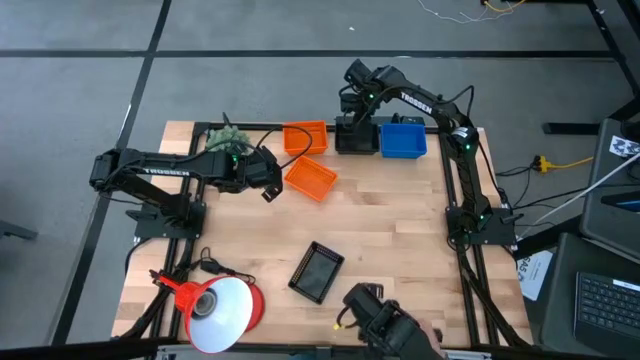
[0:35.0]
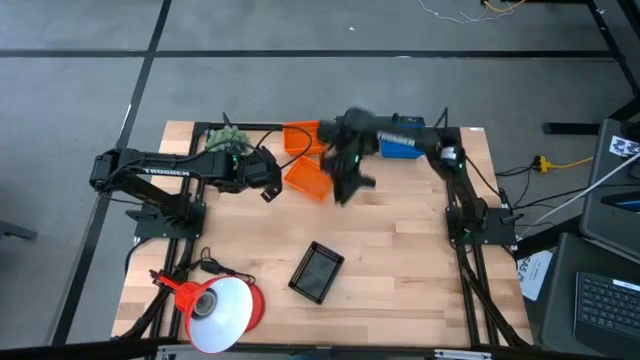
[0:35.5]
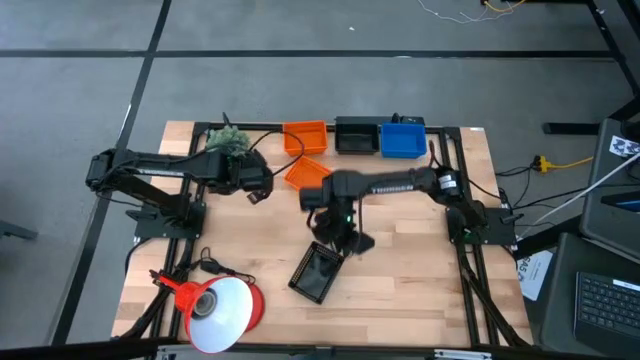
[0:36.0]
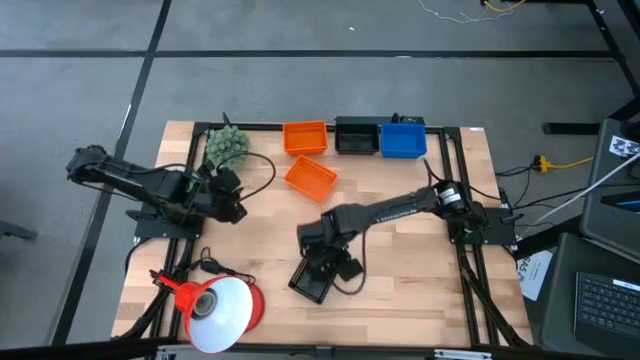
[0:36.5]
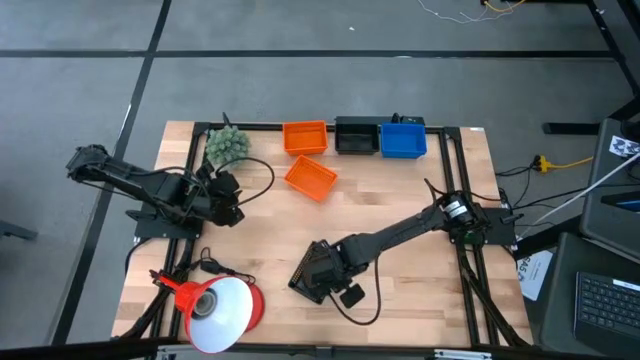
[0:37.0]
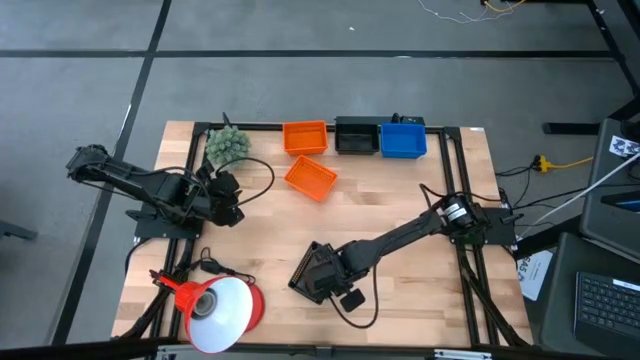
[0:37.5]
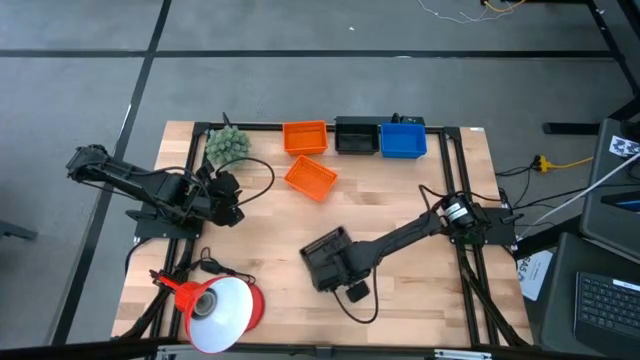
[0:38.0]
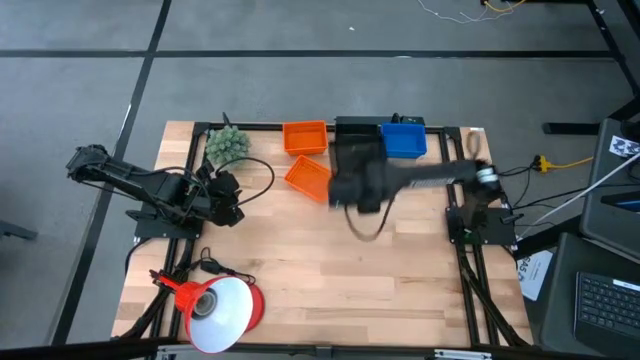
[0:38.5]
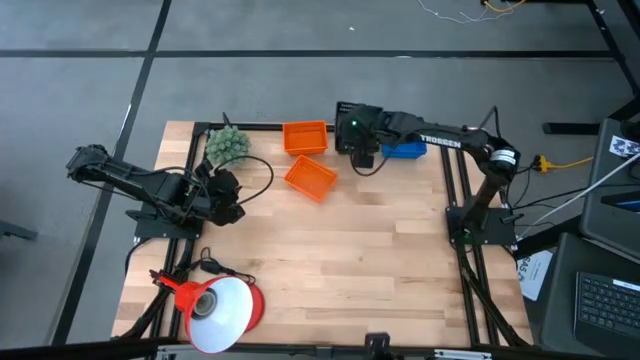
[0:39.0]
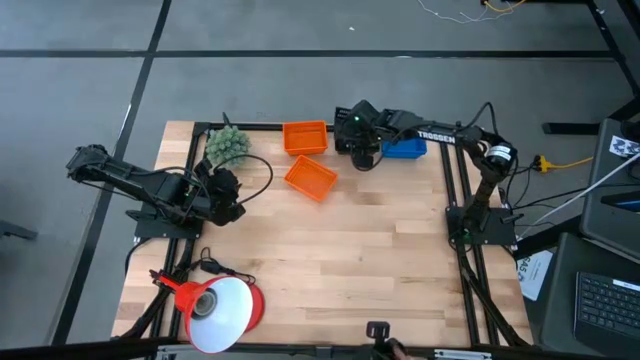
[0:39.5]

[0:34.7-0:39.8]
Stack the bottom black bin on the top black bin

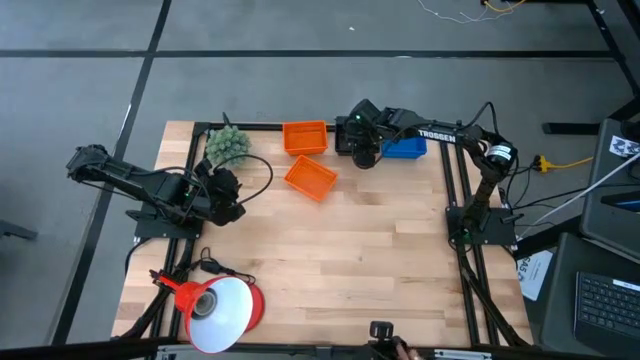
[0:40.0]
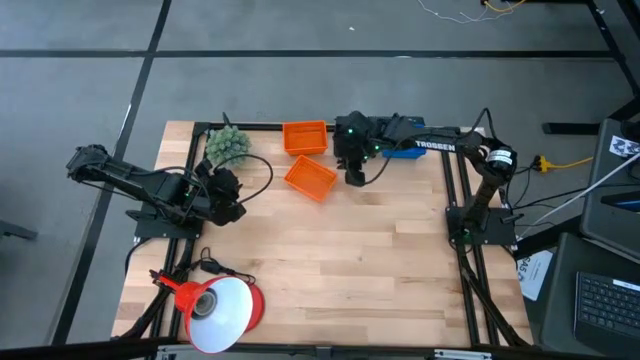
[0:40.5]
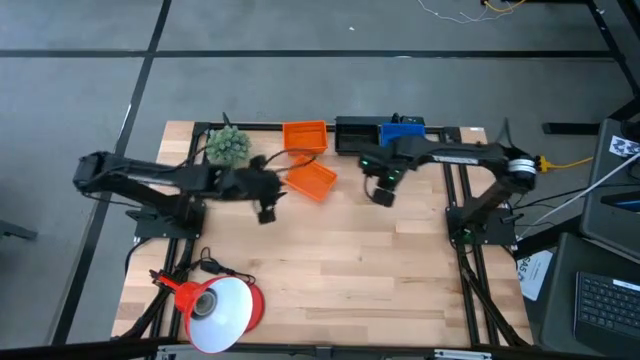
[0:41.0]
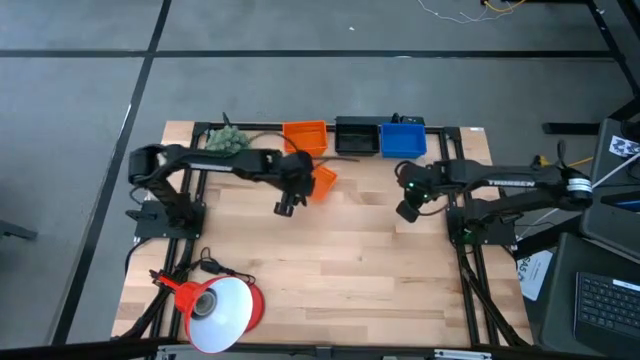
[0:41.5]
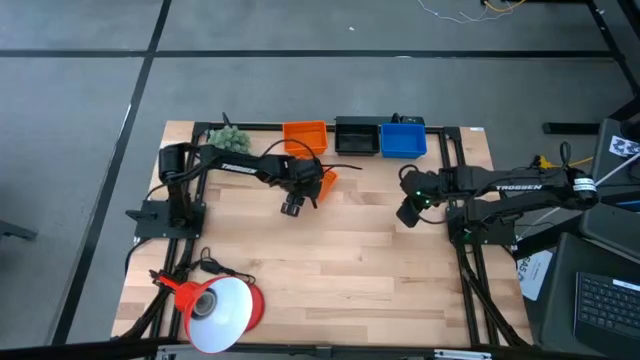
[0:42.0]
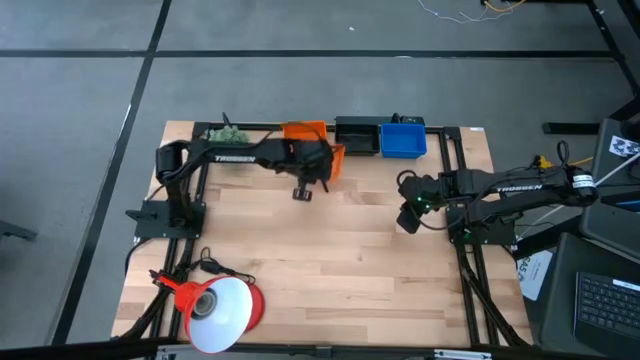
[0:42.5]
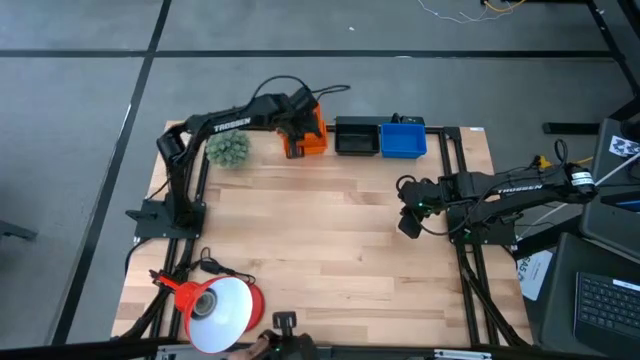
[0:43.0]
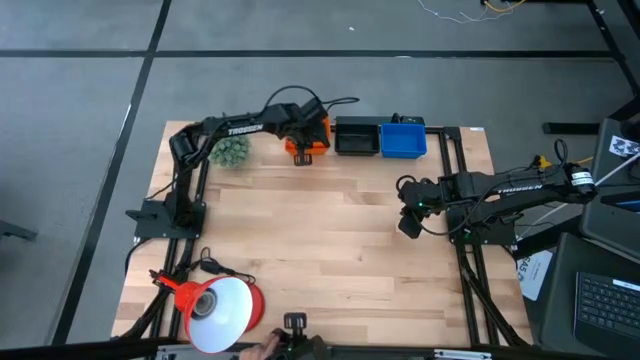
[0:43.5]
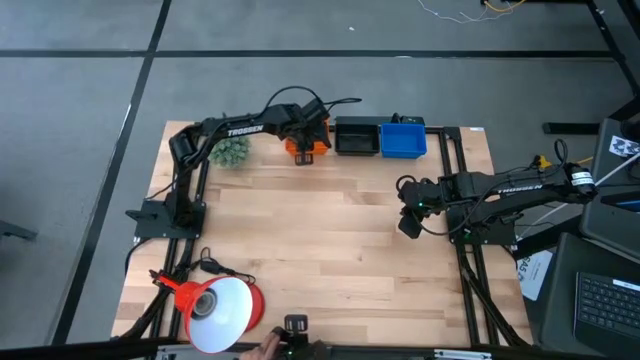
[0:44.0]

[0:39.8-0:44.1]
Stack the bottom orange basket on the top orange basket

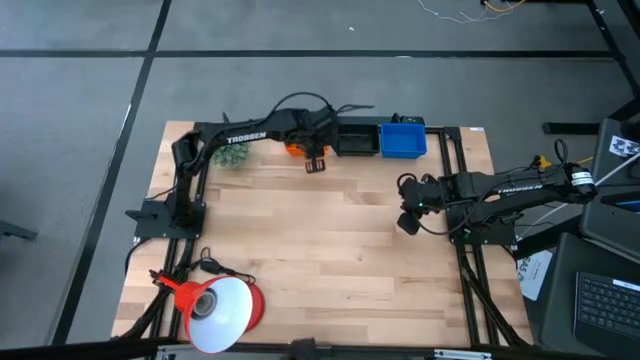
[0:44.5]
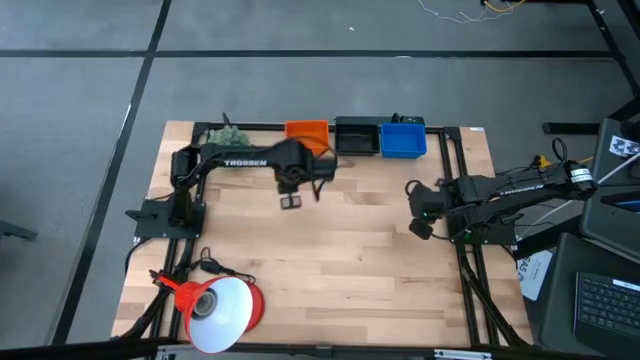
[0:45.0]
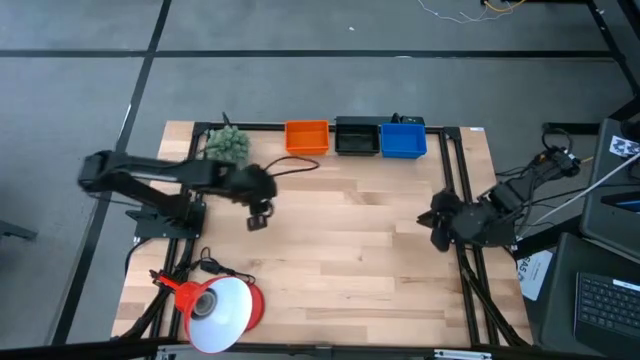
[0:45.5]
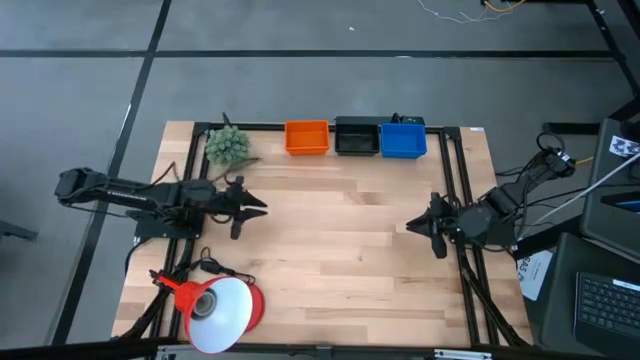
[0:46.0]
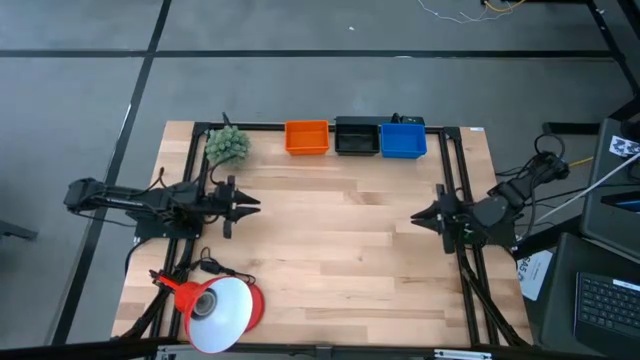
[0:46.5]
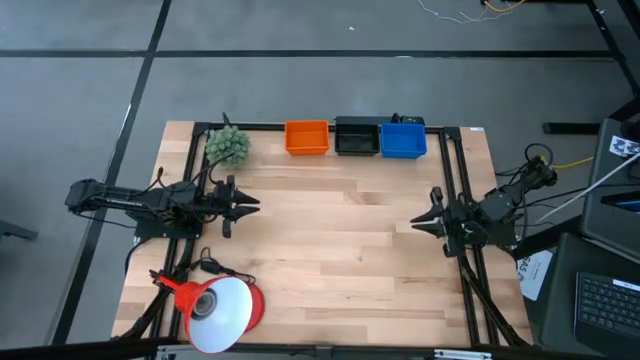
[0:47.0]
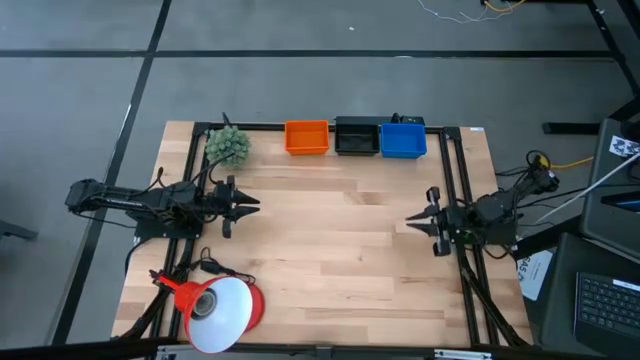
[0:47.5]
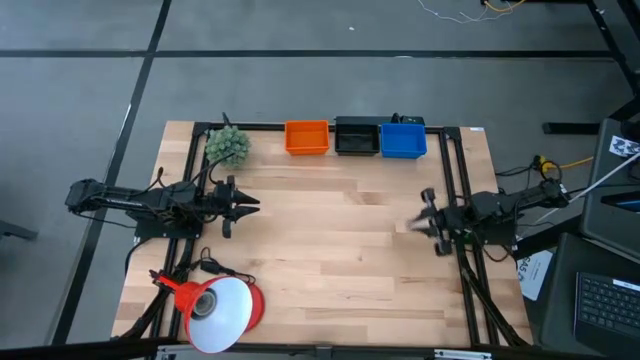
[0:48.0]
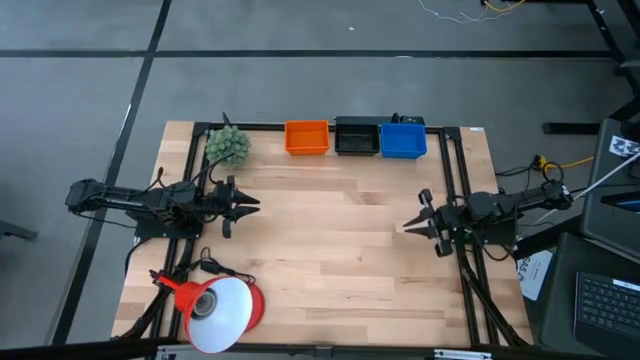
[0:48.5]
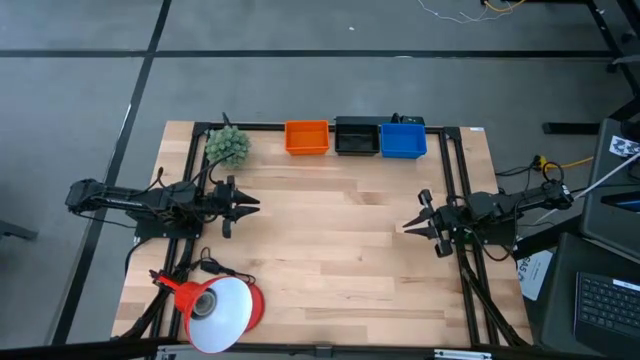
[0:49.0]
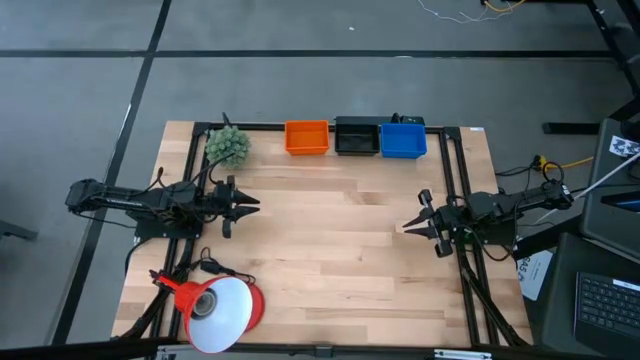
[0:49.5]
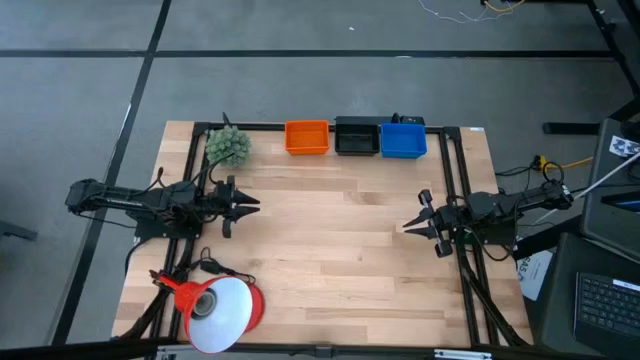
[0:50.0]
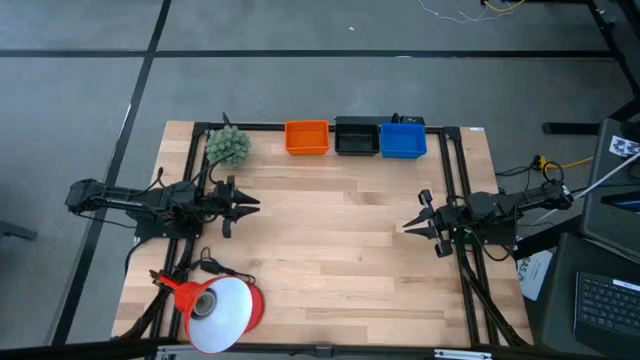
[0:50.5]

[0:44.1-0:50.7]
Return to Home Position

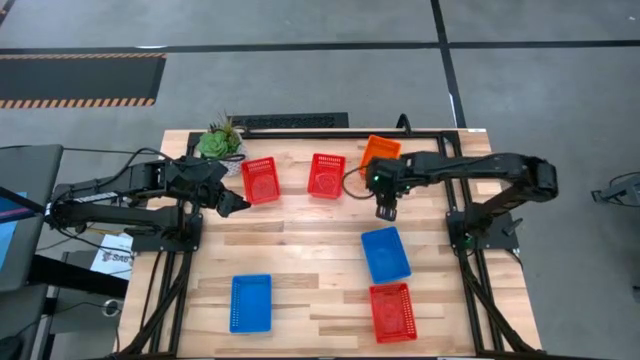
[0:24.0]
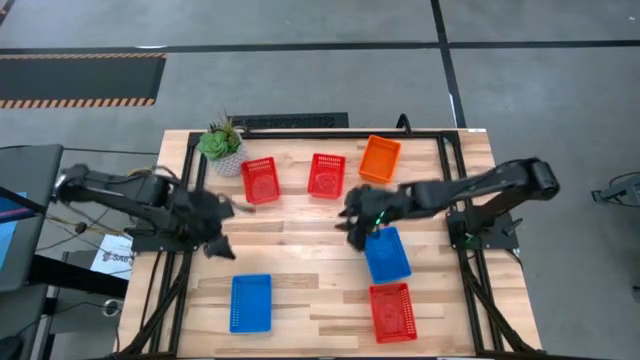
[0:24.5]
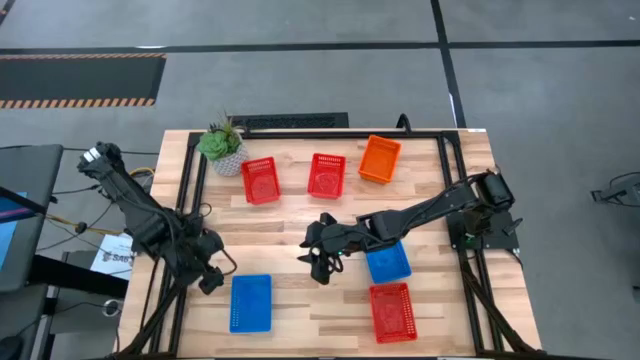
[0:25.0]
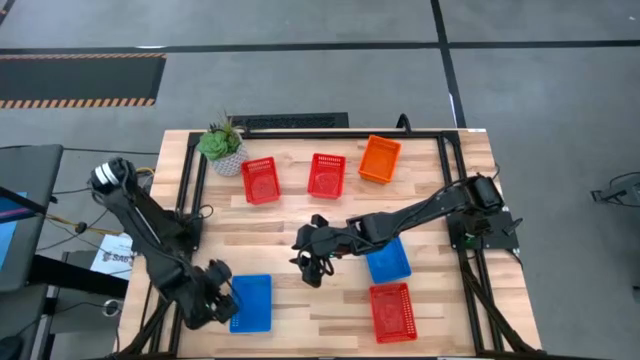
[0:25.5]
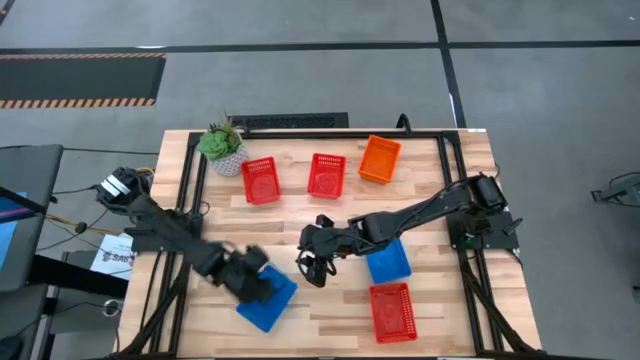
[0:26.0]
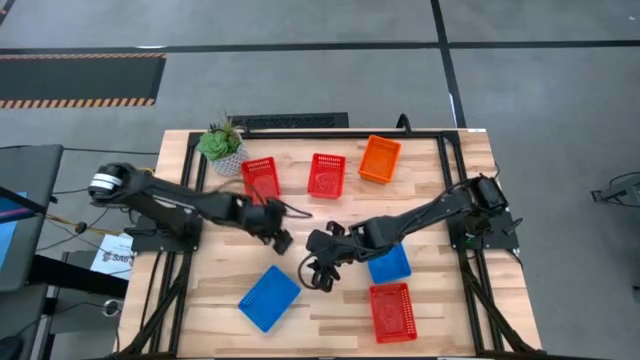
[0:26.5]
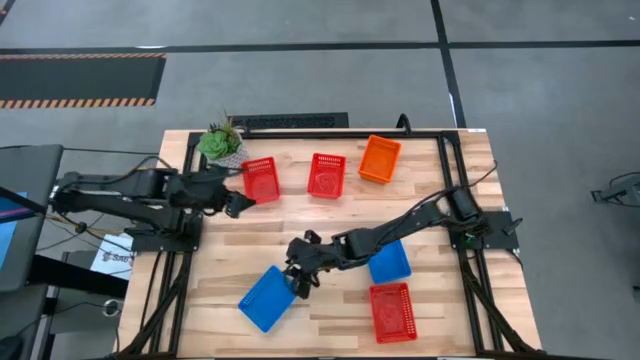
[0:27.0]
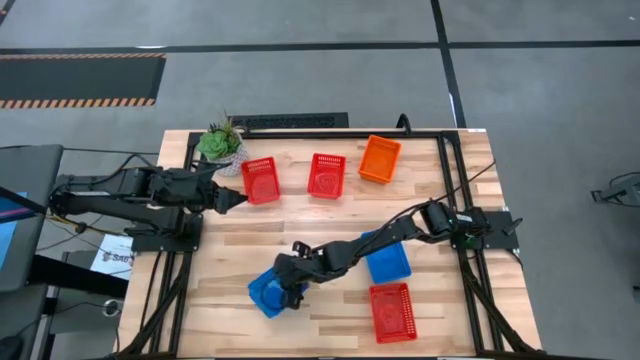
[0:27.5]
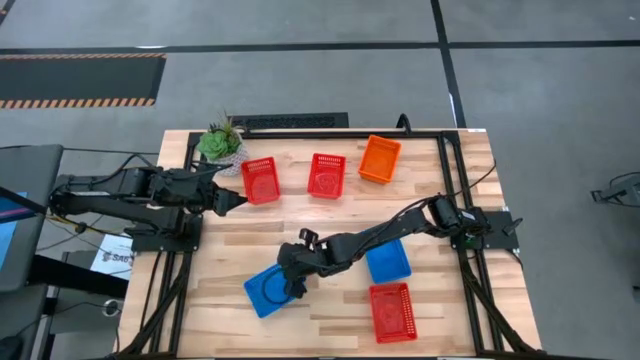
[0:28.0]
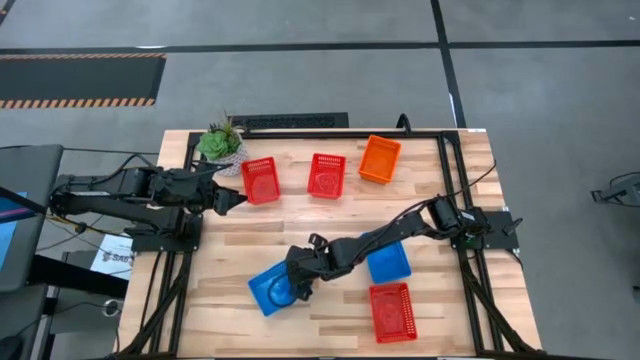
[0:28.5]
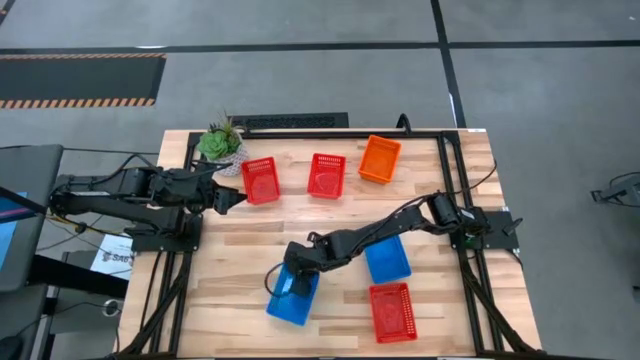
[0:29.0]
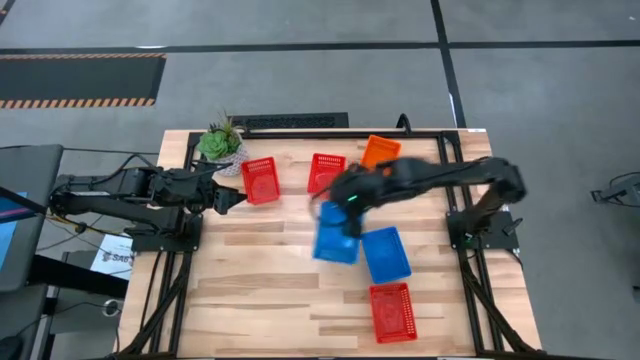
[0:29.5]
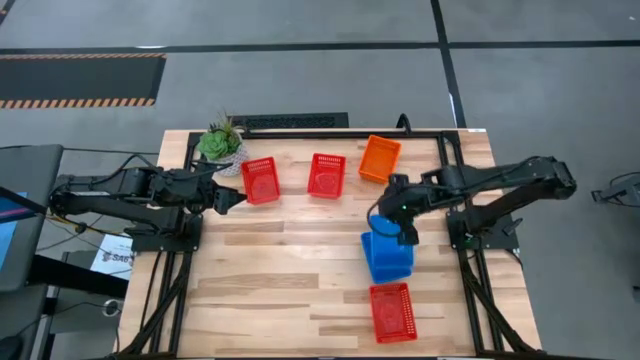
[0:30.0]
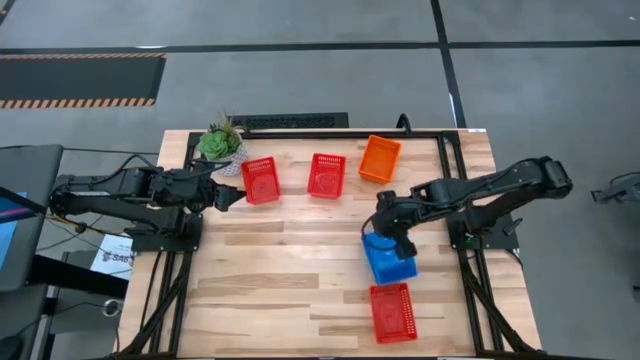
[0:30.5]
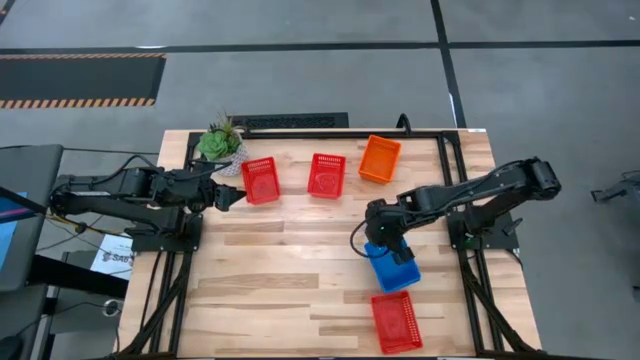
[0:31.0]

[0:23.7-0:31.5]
Stack the bottom blue bin on top of the top blue bin
